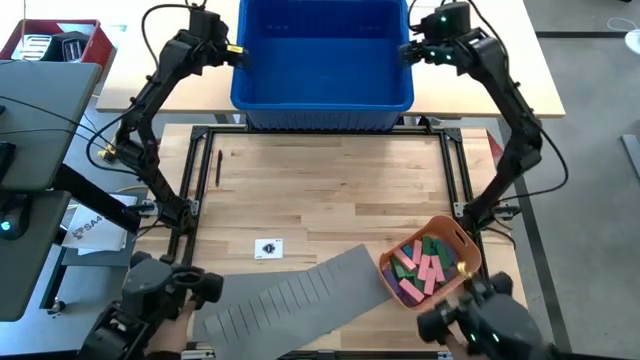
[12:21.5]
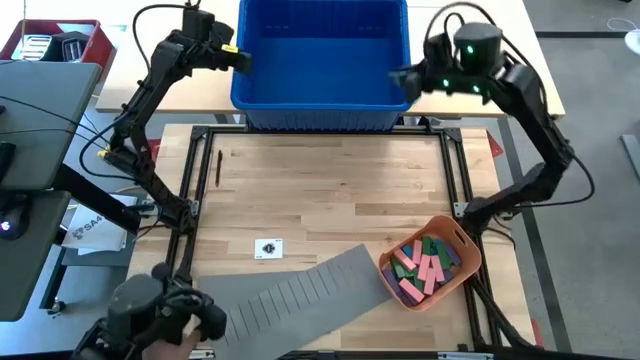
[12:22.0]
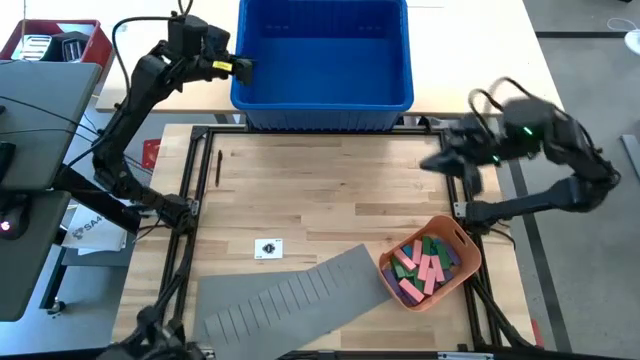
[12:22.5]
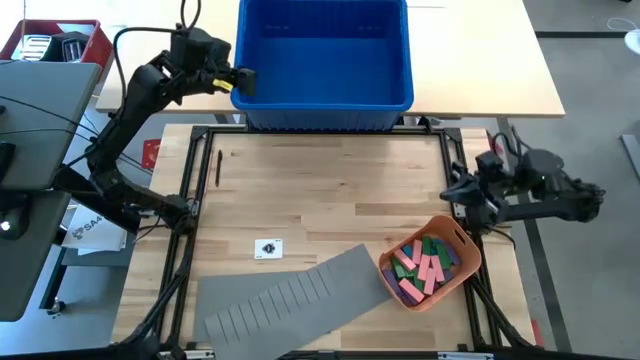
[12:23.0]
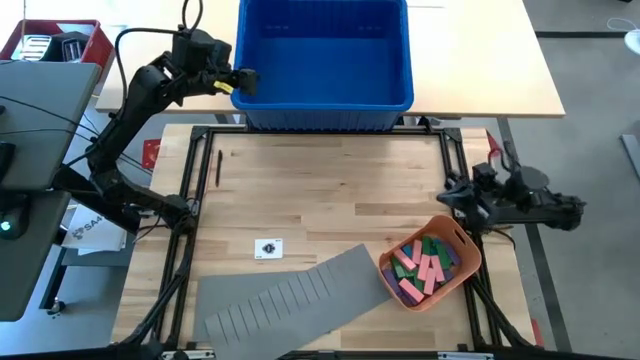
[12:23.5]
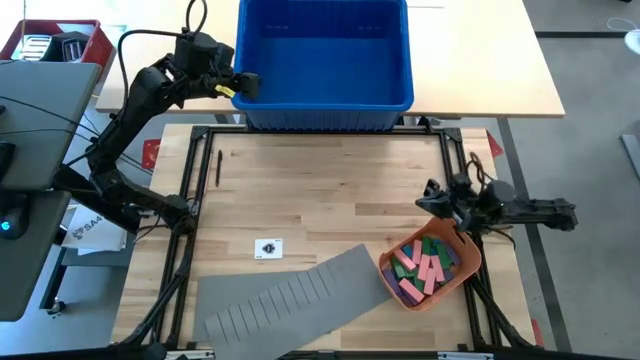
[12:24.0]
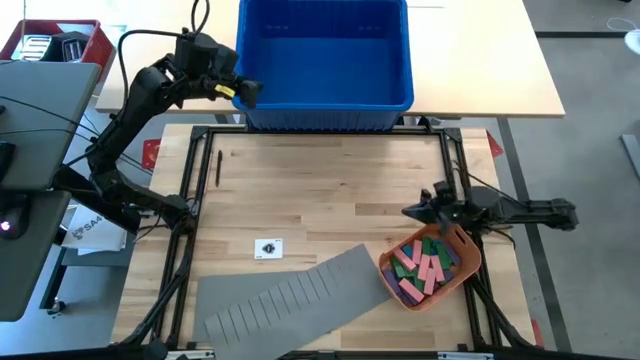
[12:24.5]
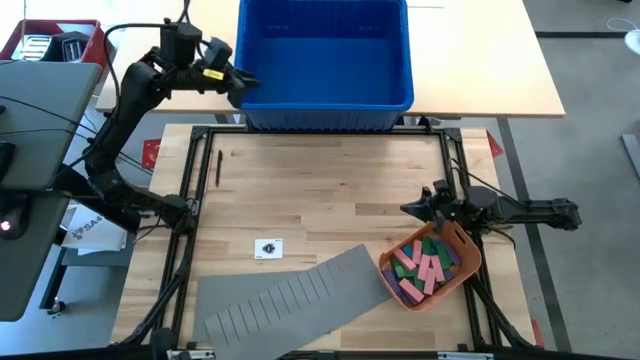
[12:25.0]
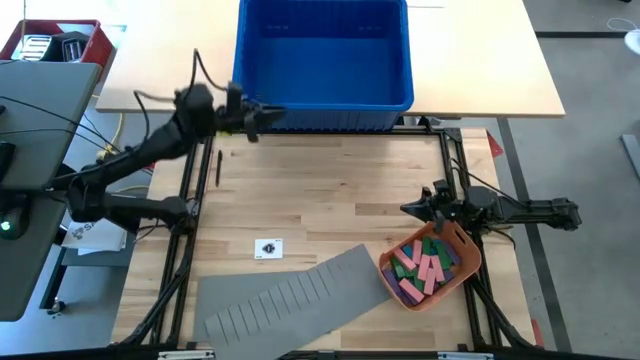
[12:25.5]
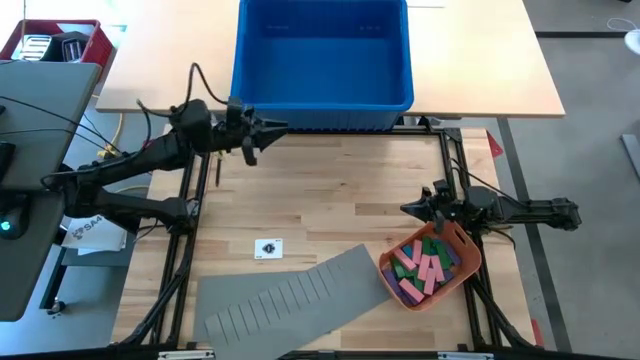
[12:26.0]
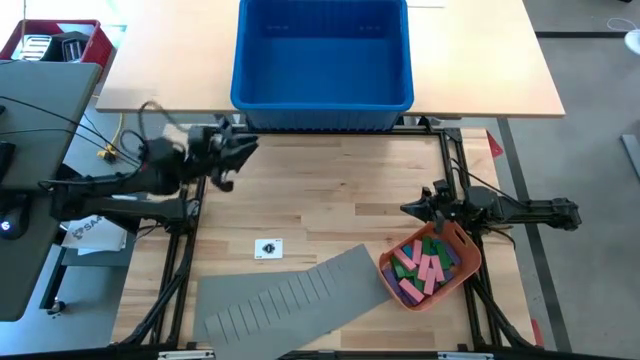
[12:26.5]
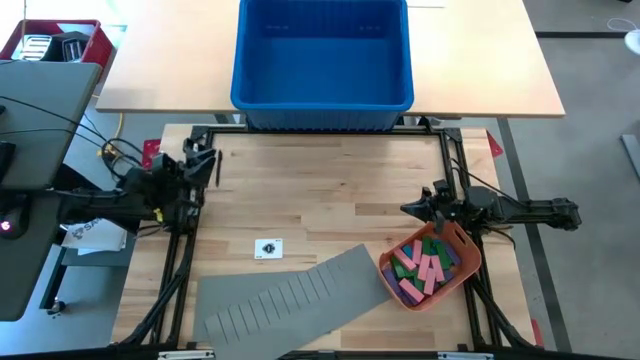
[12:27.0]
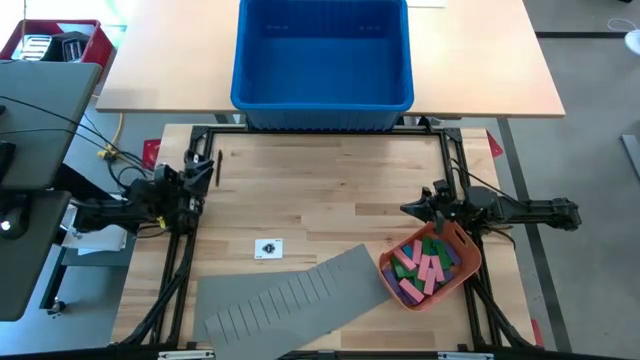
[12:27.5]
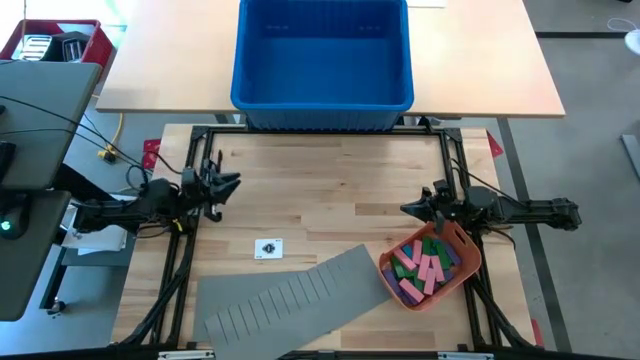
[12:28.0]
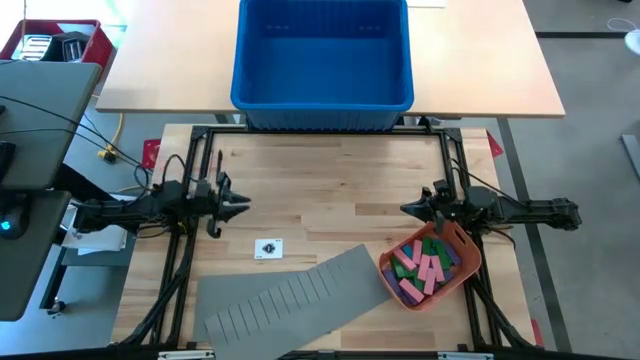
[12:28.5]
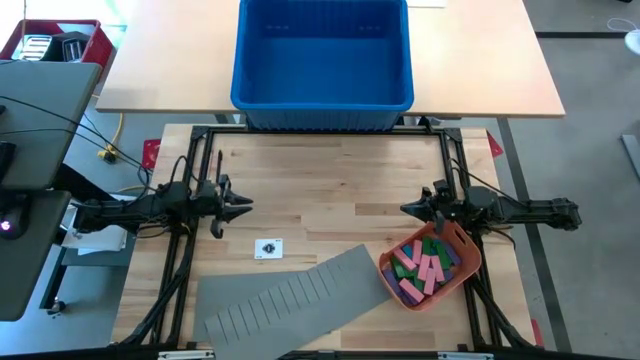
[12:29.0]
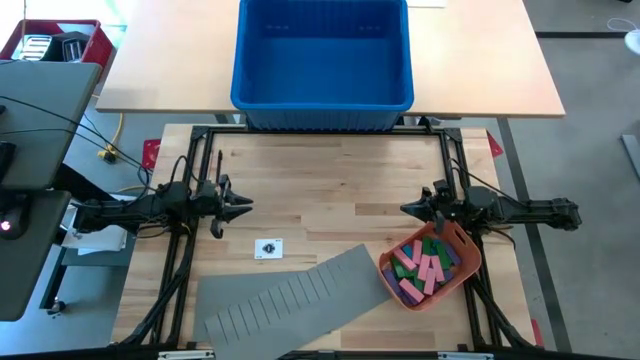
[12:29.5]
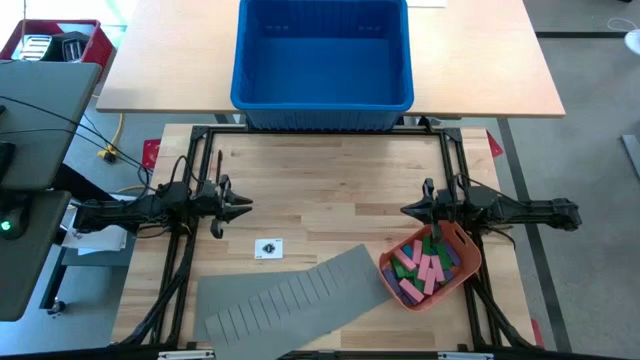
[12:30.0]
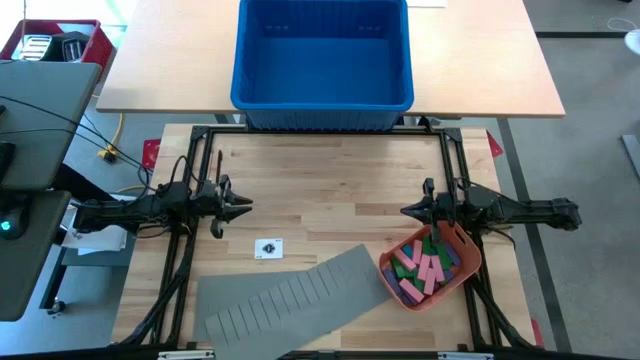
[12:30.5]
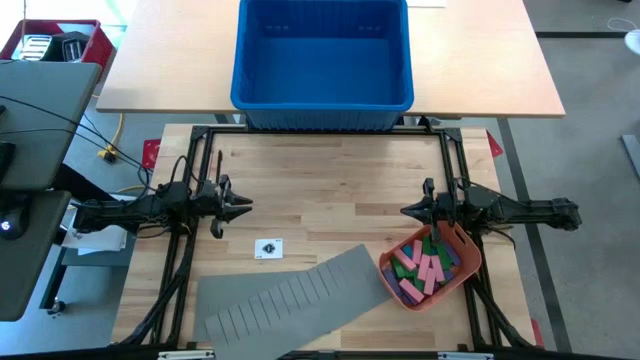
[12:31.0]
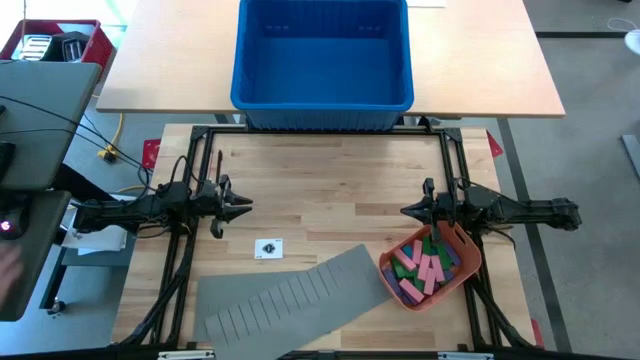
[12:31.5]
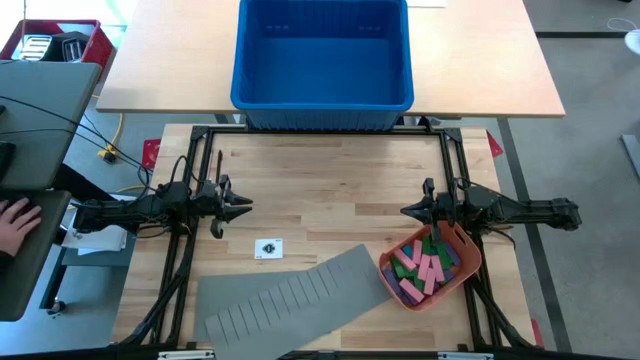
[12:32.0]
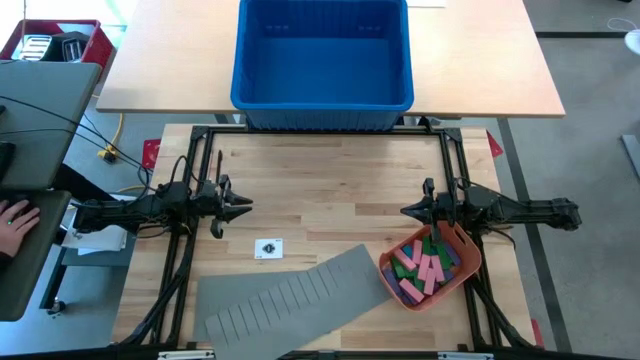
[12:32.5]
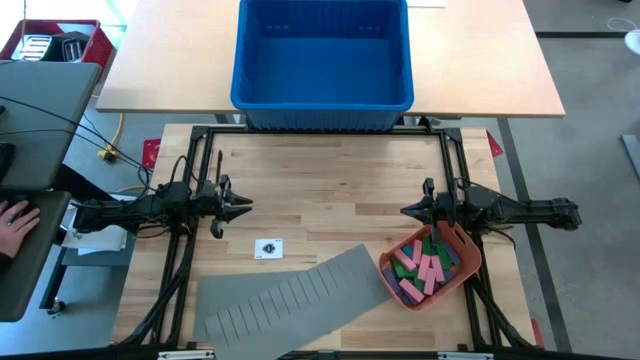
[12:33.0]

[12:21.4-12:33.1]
Task: Sort blocks
Return to Home Position

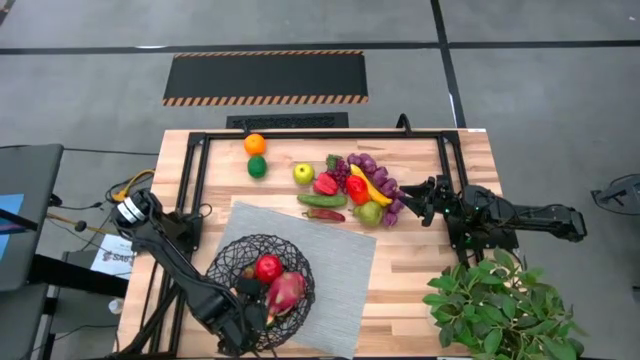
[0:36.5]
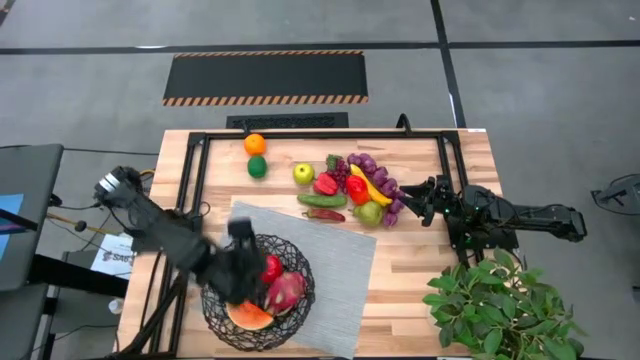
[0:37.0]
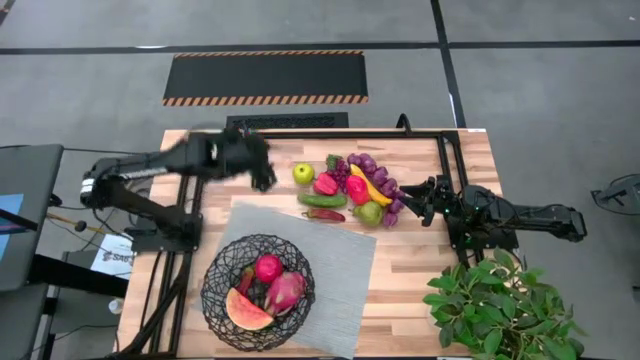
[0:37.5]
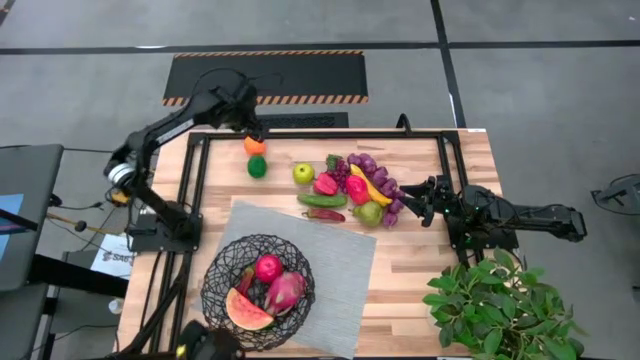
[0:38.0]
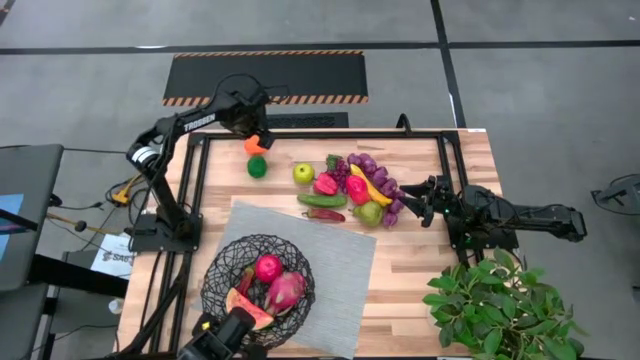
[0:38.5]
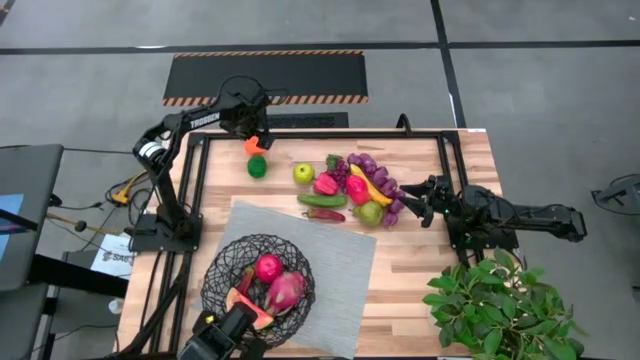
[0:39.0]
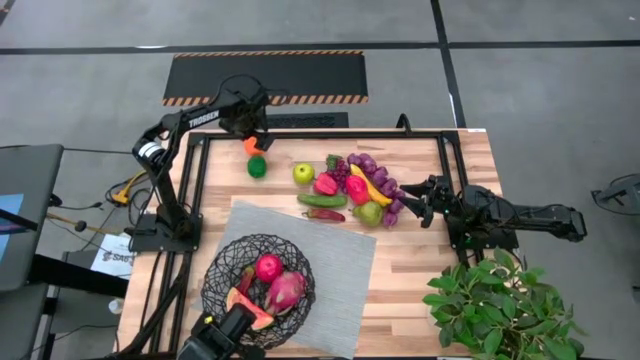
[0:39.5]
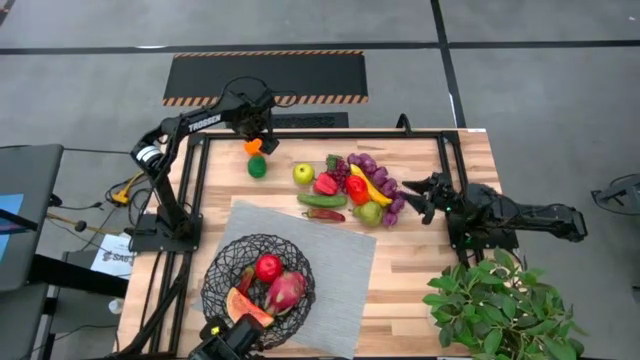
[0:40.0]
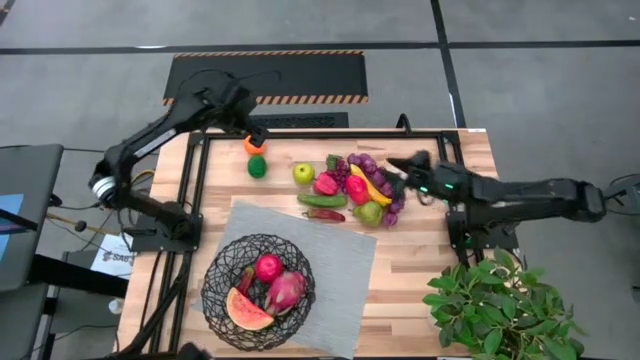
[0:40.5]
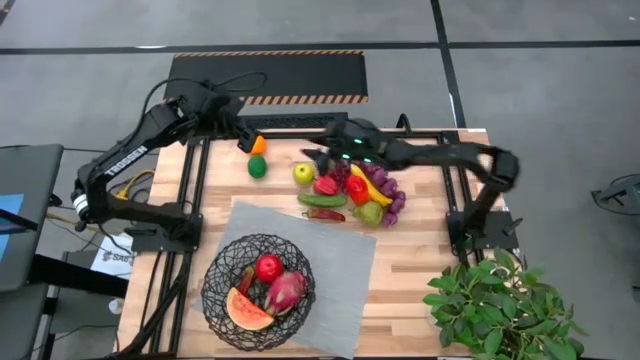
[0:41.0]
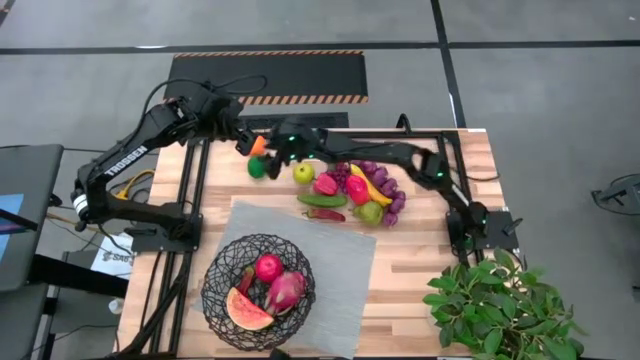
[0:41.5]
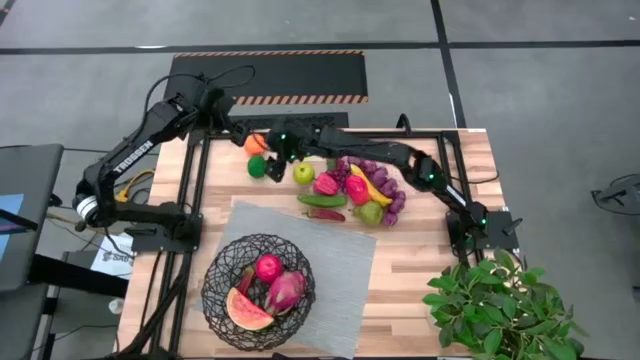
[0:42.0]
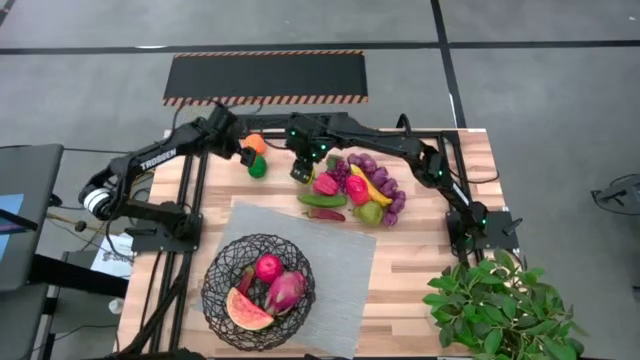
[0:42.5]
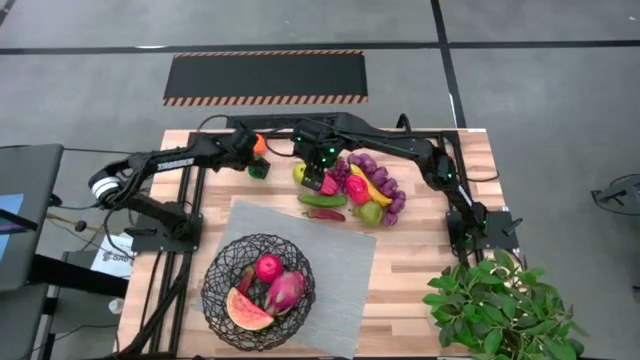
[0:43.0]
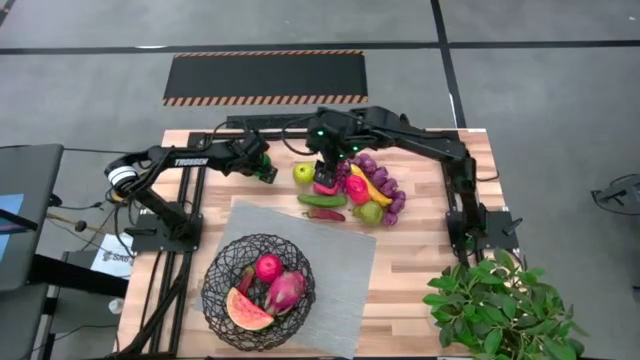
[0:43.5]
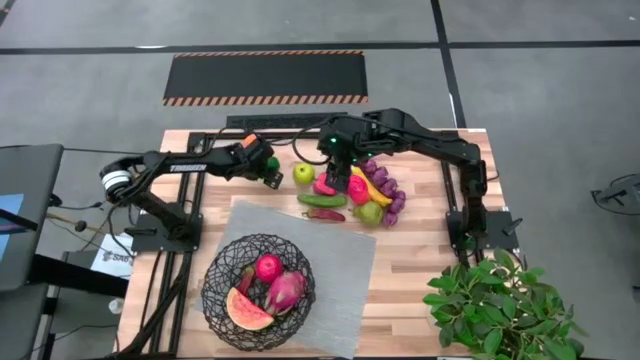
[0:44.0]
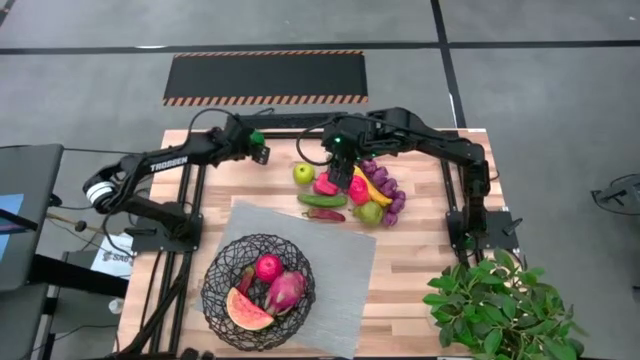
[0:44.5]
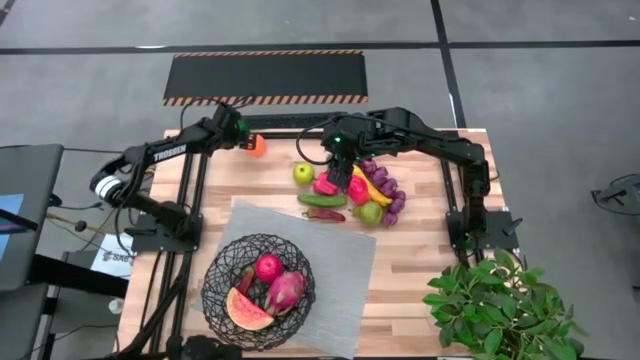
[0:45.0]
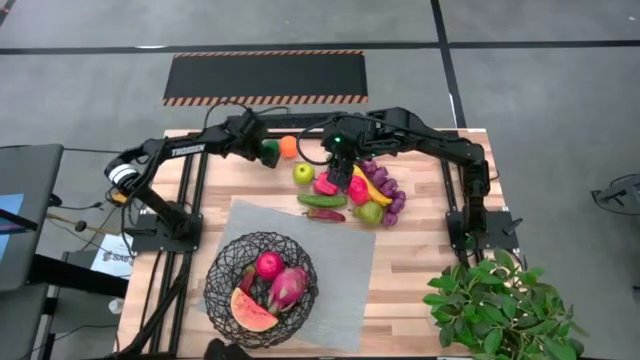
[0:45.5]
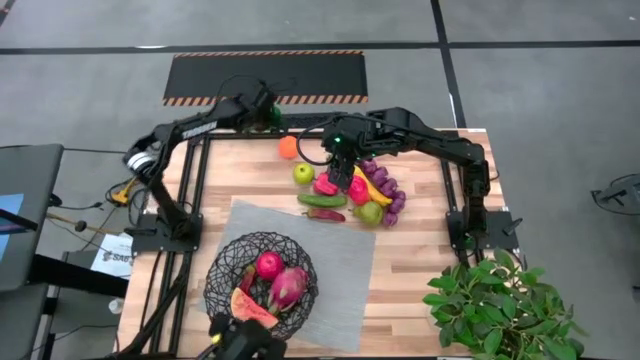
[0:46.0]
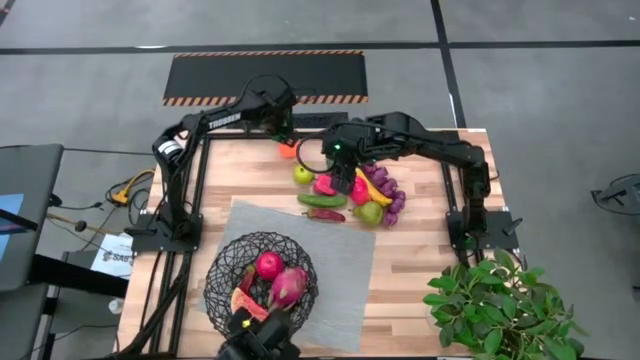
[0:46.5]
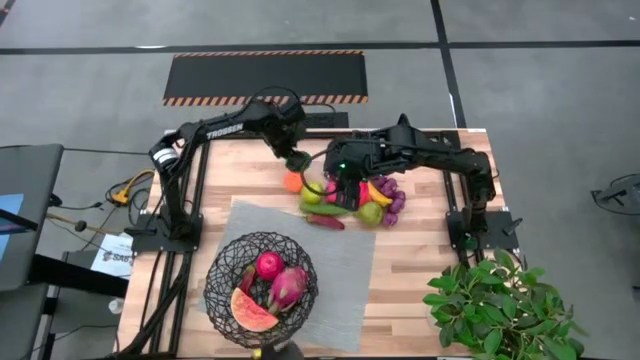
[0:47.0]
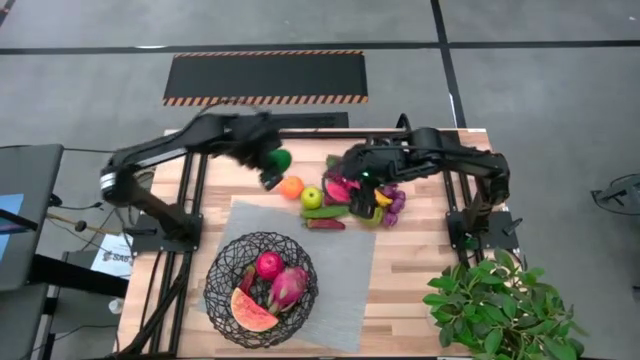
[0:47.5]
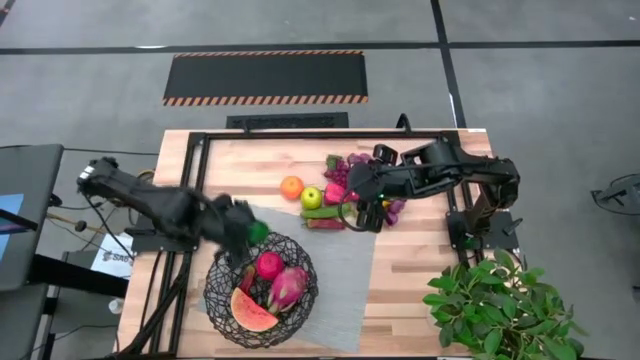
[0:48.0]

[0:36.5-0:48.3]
Task: Build produce basket
Put the green lime into the mesh basket
